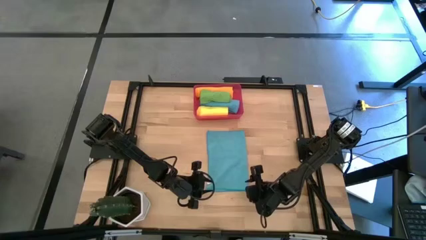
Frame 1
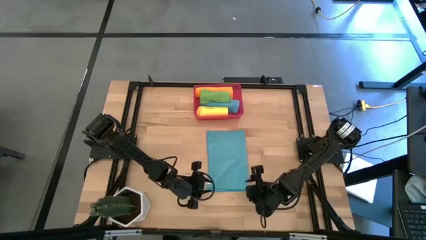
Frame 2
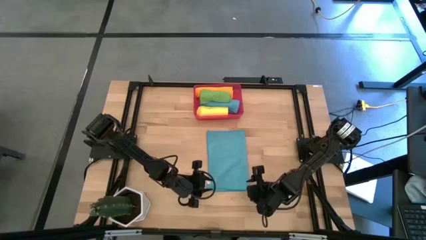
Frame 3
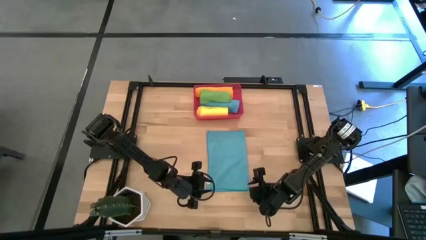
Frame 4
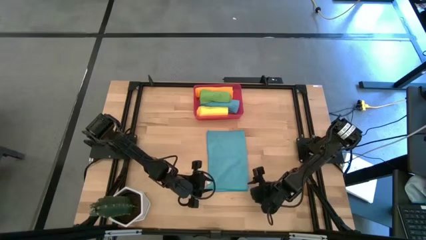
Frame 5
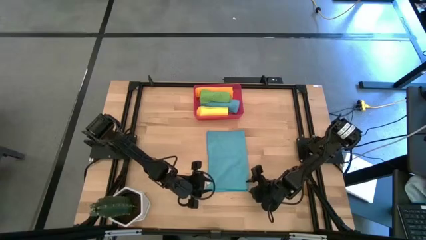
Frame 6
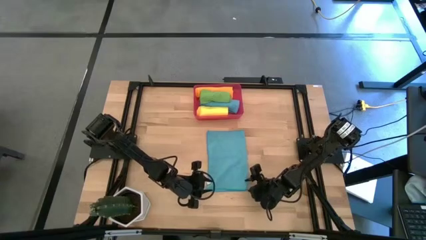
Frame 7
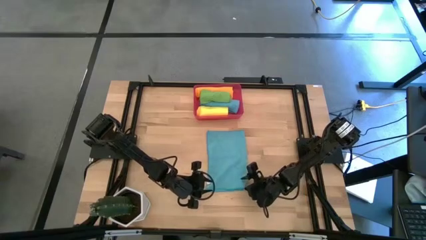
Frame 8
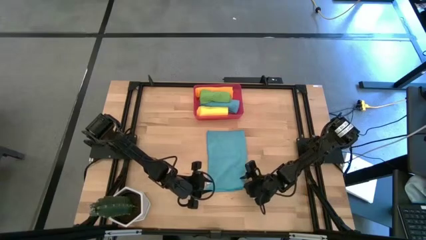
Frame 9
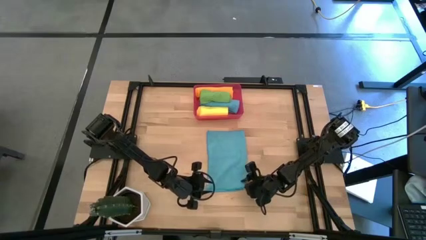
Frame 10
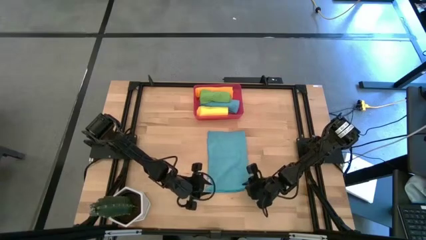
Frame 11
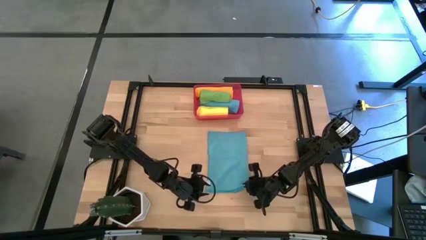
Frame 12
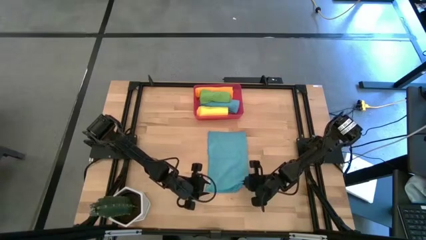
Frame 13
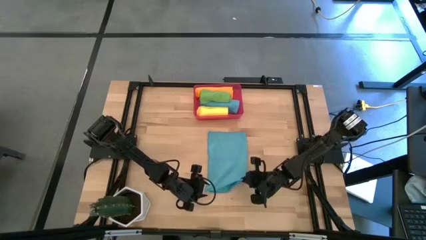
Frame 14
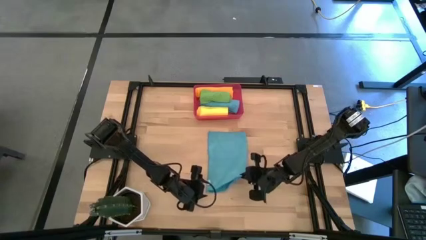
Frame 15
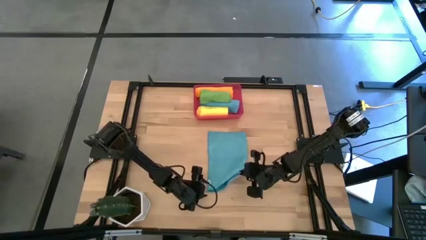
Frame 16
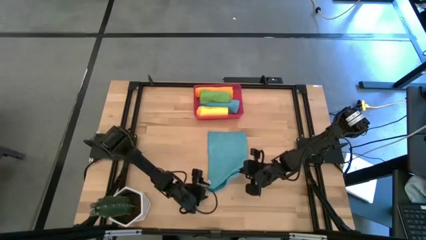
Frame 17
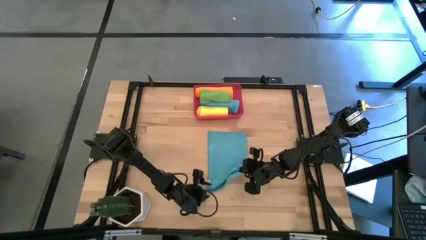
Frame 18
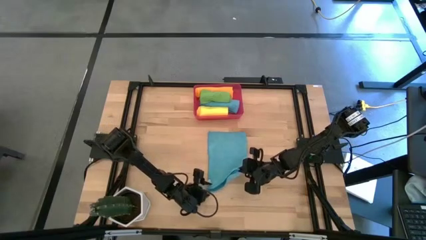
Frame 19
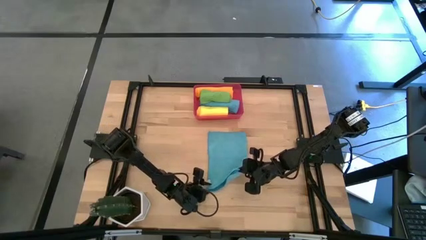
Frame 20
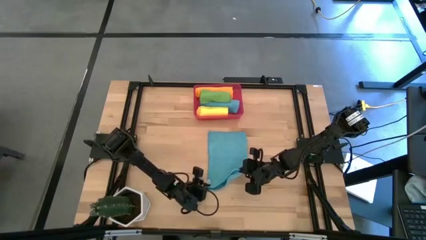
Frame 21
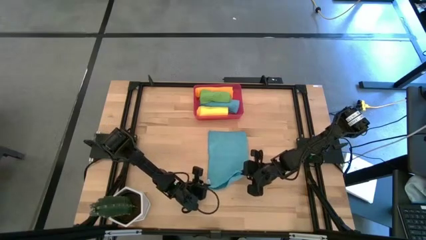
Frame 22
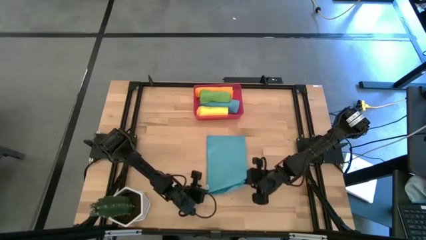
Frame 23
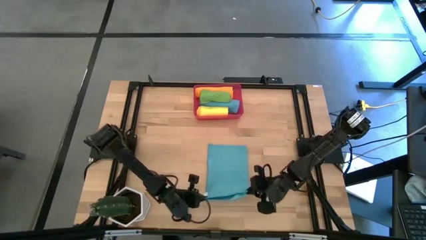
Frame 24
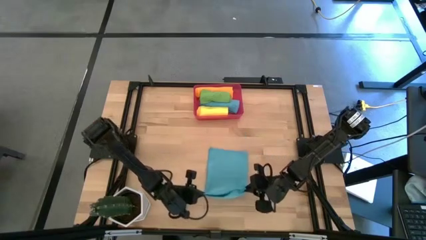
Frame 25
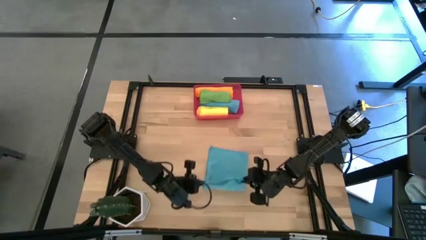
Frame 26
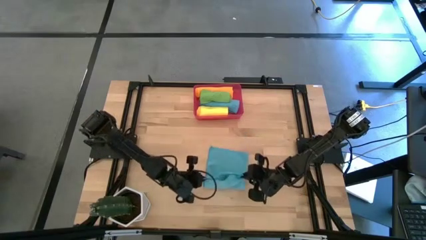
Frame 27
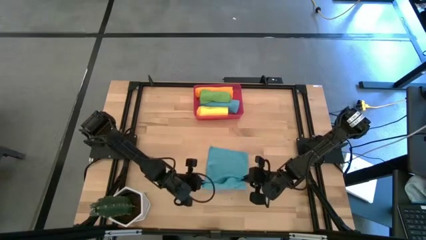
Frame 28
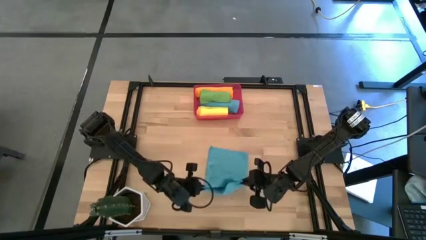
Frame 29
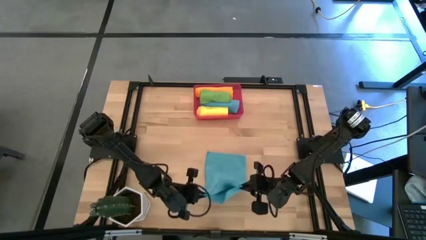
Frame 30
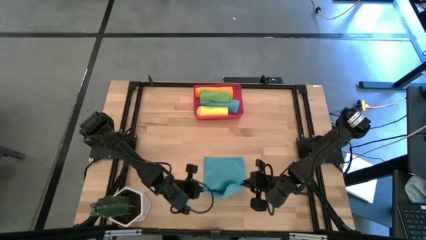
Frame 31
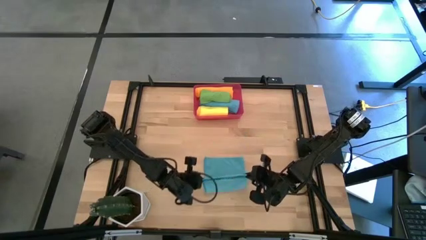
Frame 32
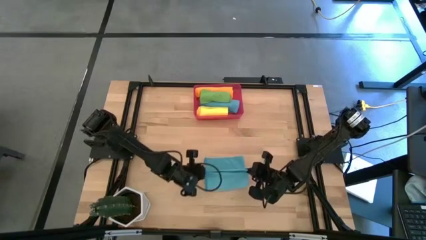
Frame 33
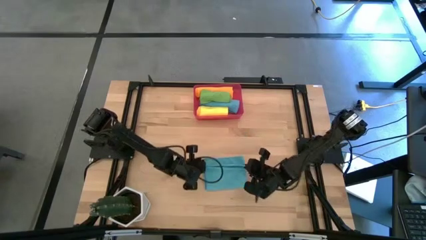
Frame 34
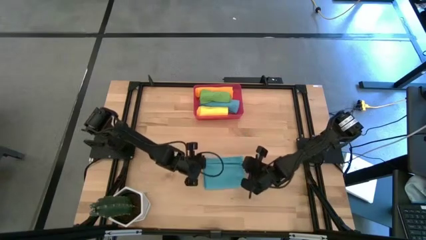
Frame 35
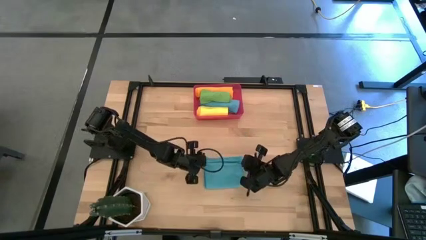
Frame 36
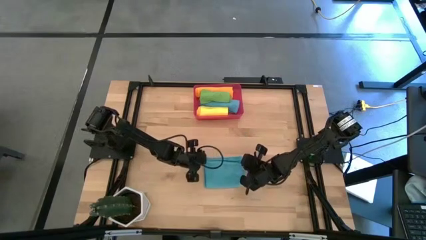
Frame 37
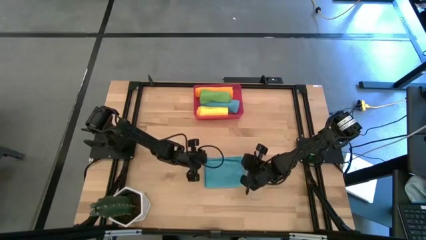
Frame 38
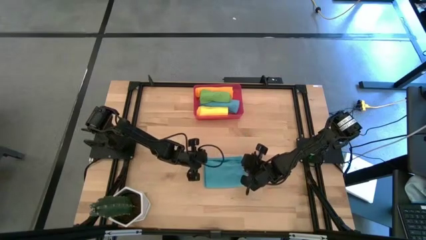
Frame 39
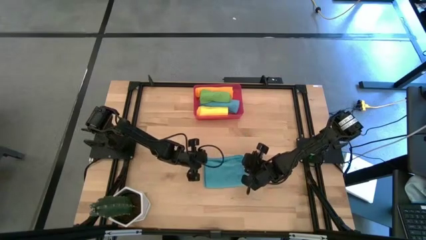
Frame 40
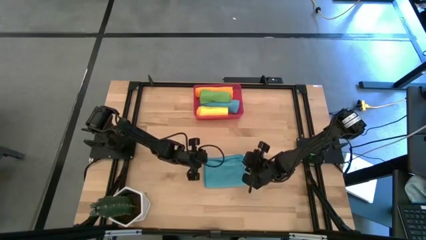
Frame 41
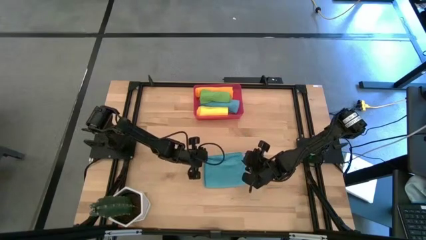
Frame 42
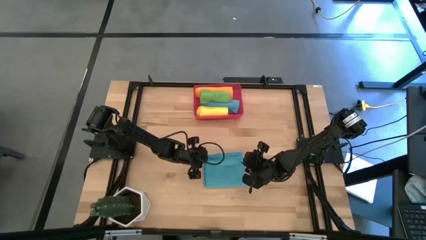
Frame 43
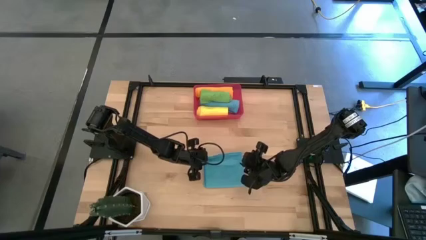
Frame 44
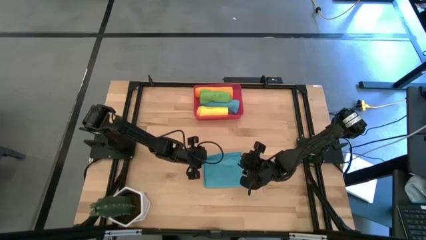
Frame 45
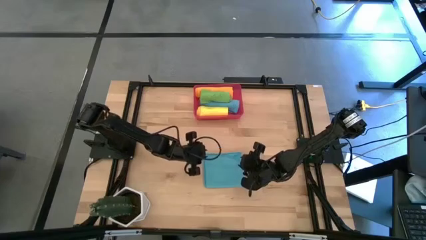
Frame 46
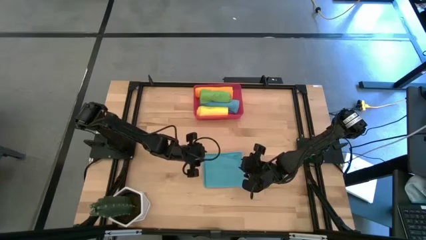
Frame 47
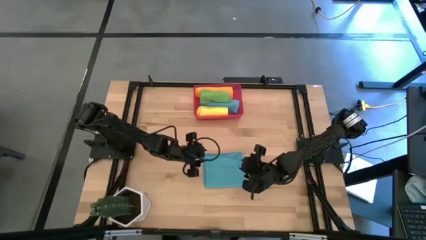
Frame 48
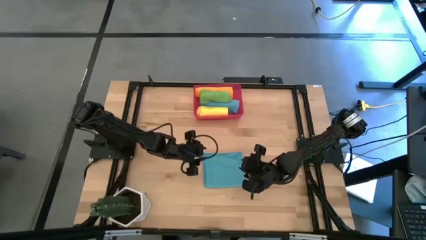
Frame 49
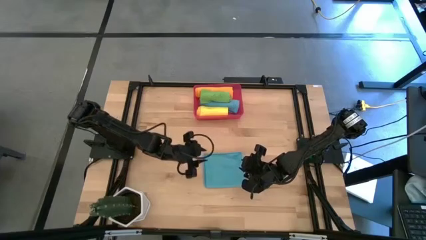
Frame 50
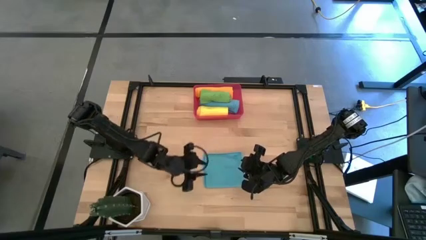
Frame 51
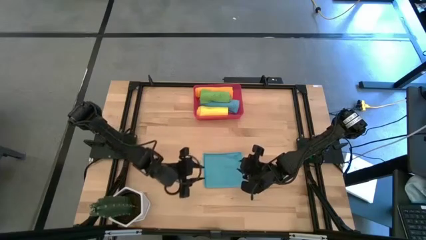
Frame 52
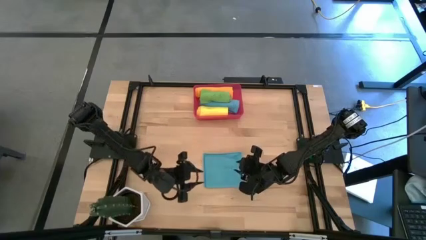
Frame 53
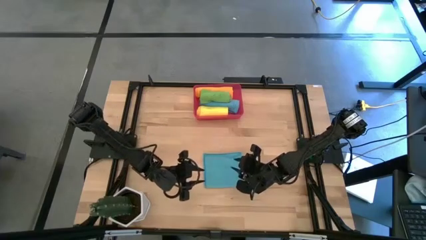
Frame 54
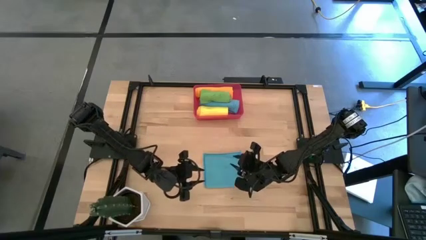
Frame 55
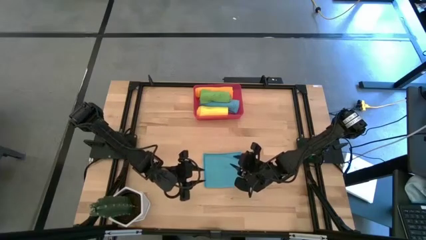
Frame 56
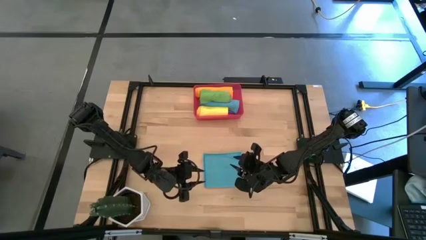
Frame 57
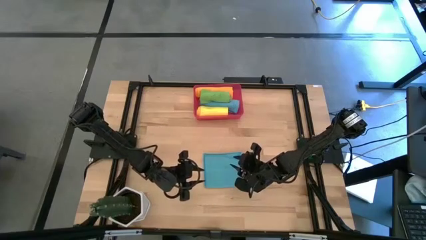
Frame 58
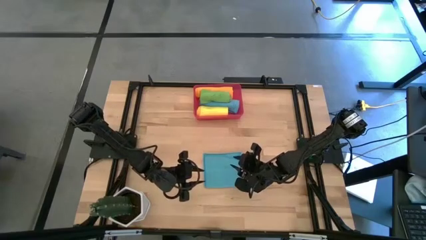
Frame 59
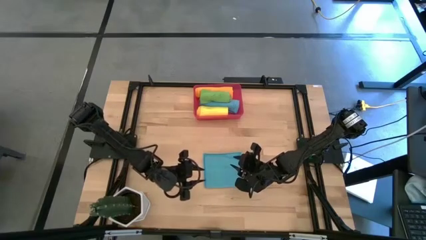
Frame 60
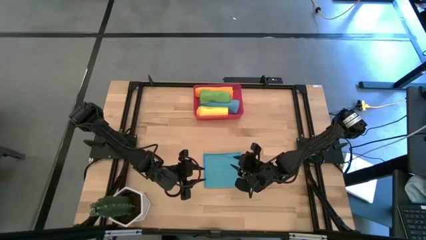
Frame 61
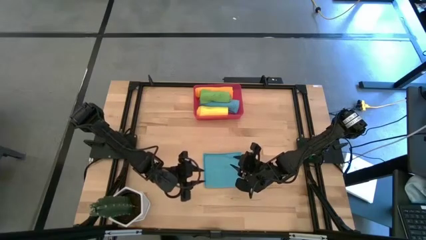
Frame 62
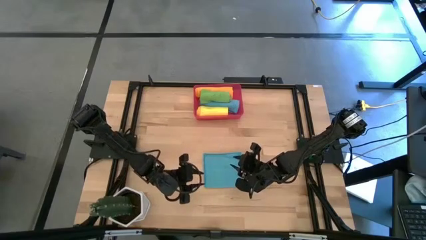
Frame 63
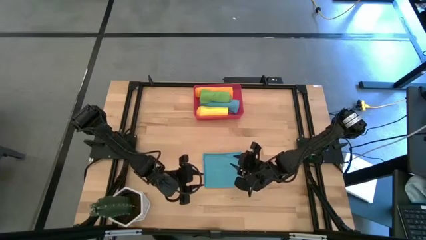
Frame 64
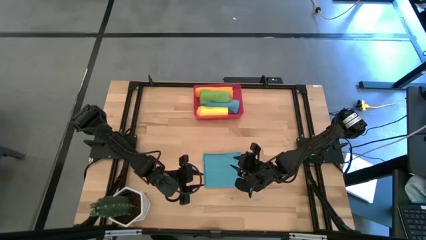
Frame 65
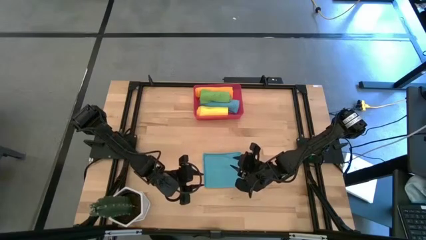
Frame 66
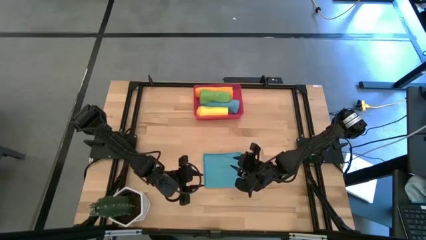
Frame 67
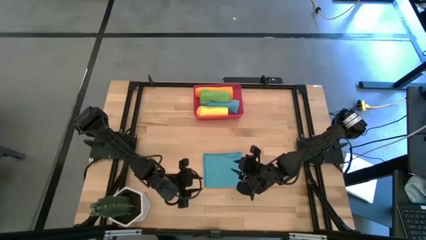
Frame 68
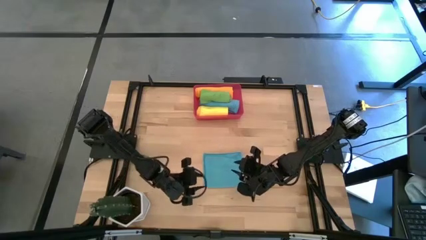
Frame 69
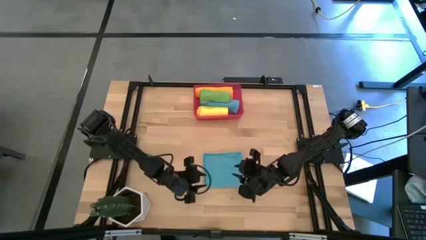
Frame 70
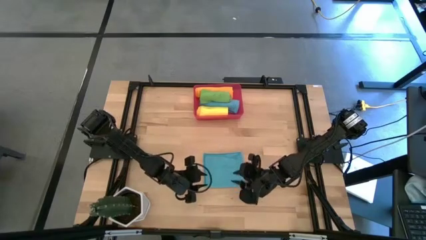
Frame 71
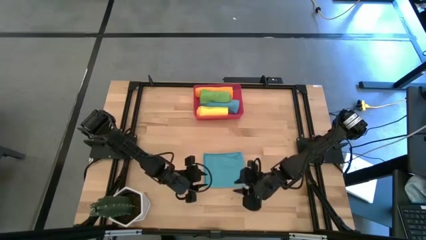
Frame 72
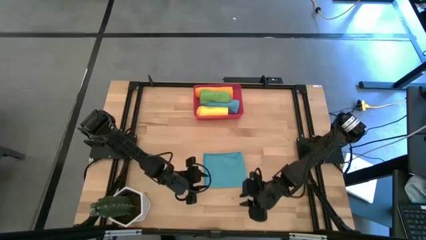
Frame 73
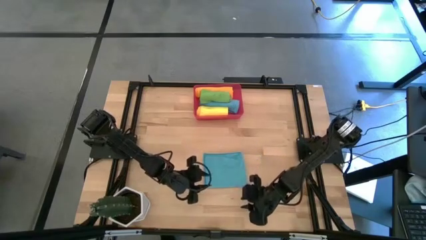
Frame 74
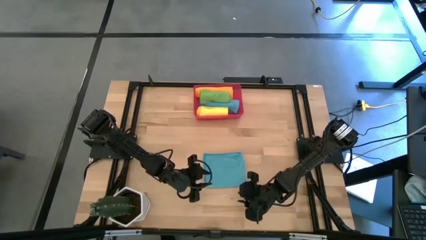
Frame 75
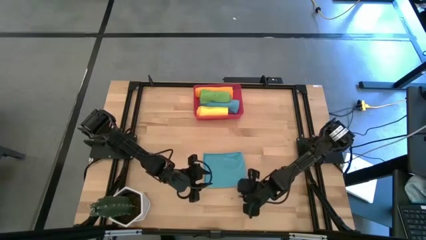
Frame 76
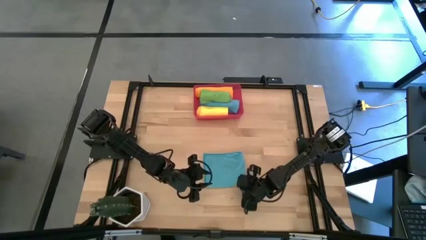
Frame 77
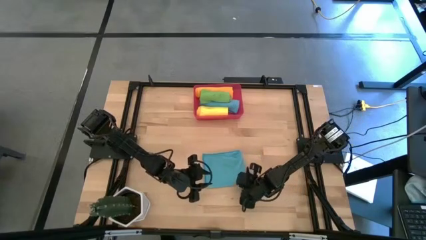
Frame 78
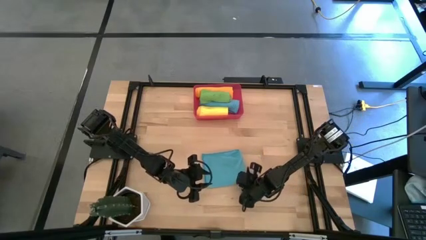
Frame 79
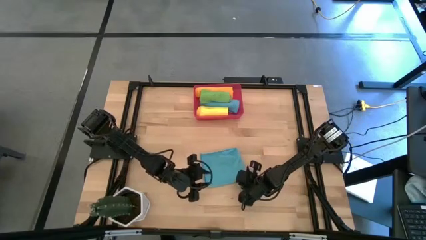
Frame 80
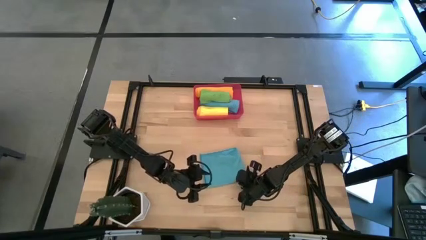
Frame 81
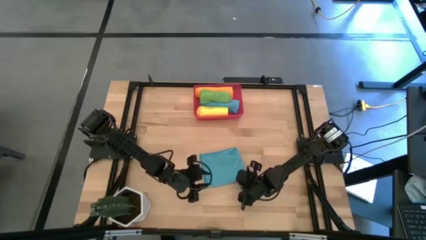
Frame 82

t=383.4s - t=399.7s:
Task: Roll microfiber towels into tight, uniform cylinder then place into a basket
Roll the blue microfiber cloth
